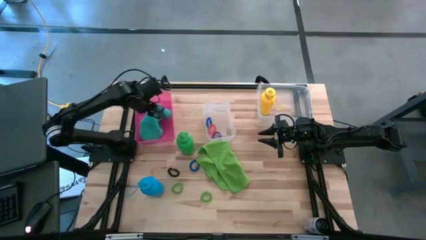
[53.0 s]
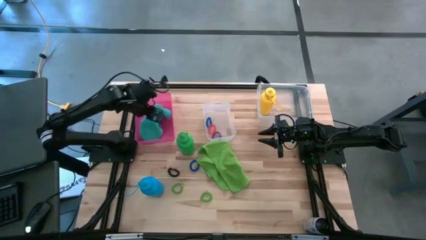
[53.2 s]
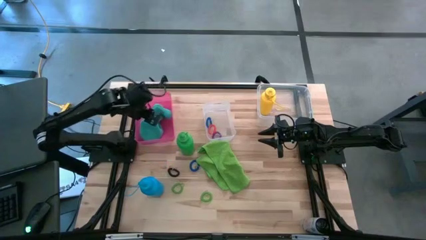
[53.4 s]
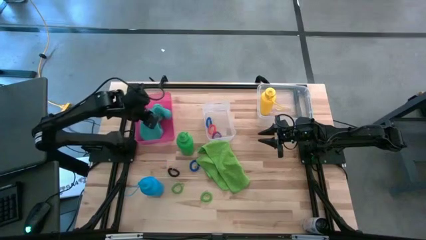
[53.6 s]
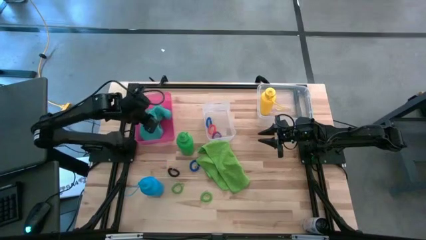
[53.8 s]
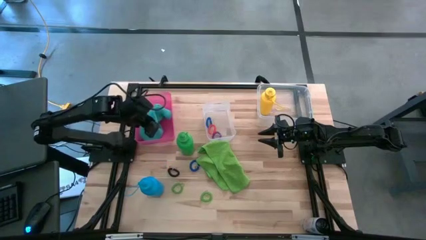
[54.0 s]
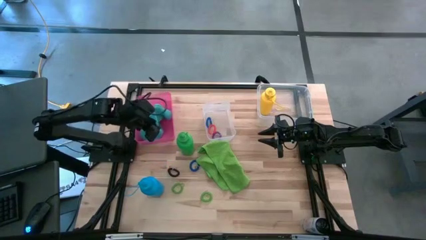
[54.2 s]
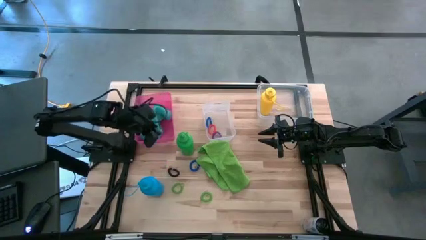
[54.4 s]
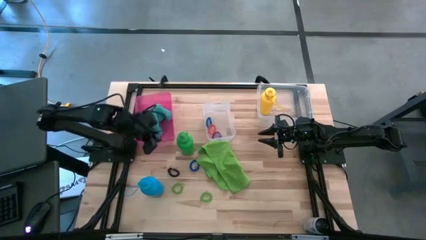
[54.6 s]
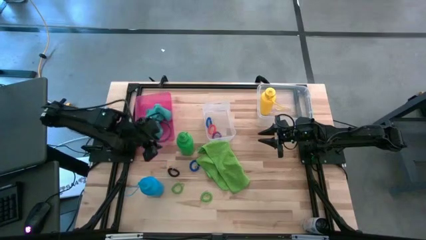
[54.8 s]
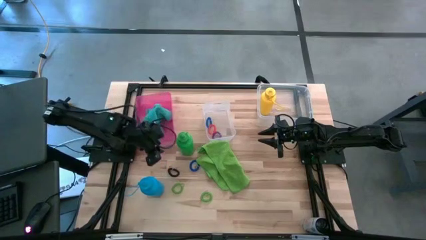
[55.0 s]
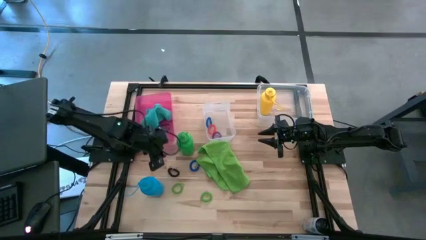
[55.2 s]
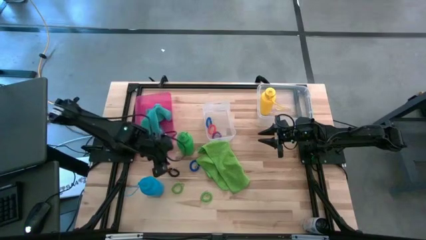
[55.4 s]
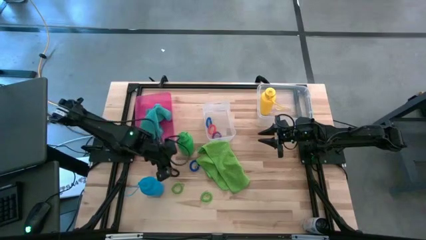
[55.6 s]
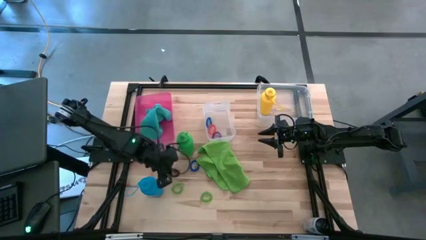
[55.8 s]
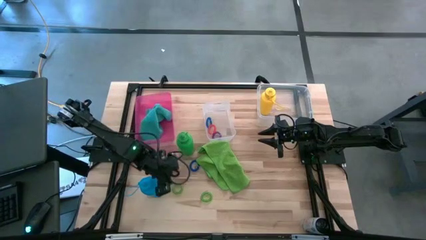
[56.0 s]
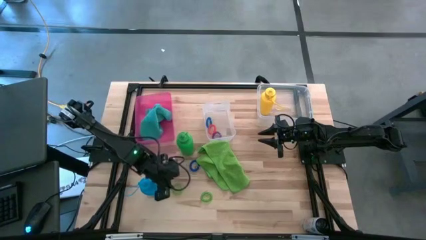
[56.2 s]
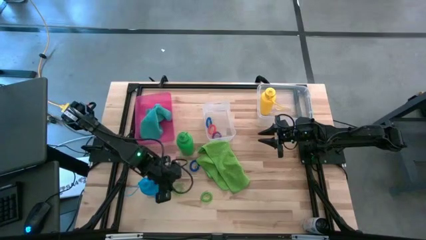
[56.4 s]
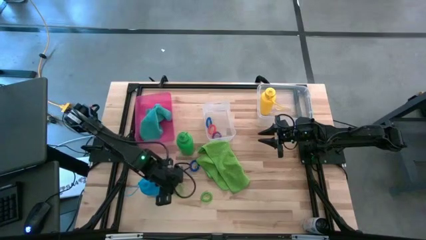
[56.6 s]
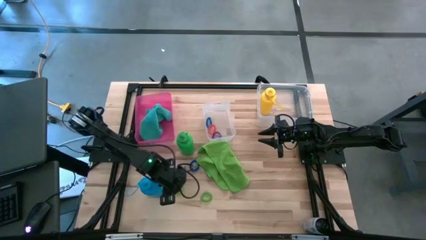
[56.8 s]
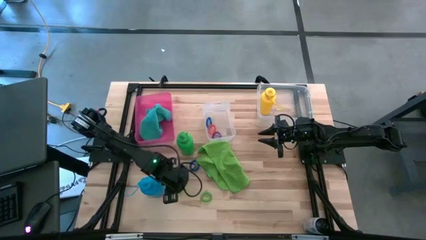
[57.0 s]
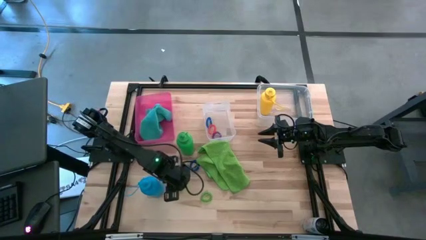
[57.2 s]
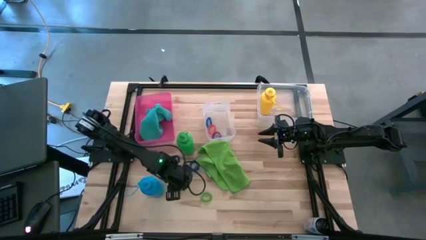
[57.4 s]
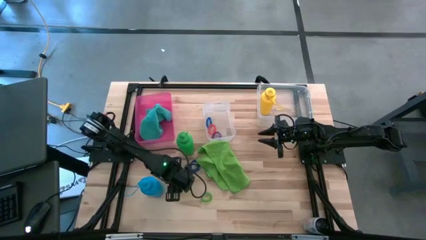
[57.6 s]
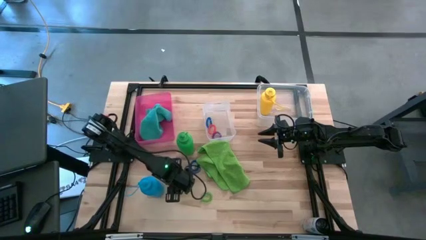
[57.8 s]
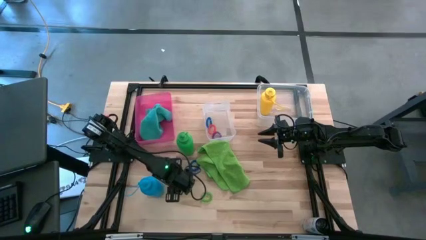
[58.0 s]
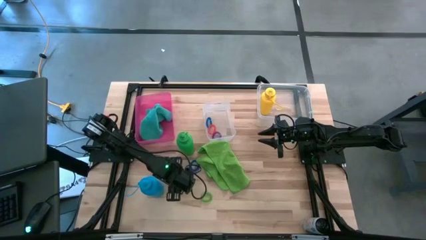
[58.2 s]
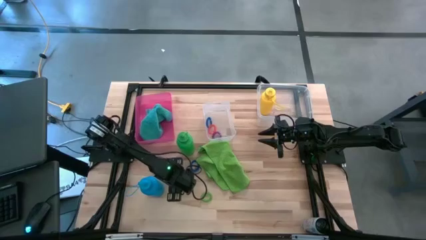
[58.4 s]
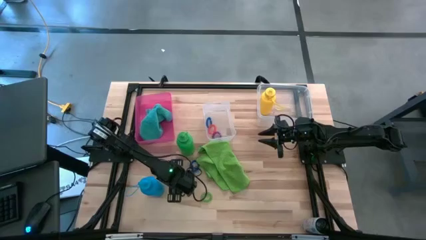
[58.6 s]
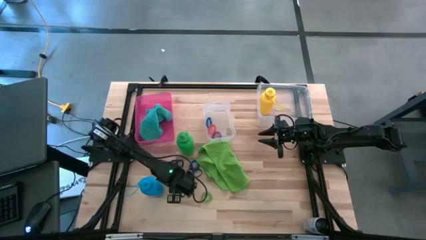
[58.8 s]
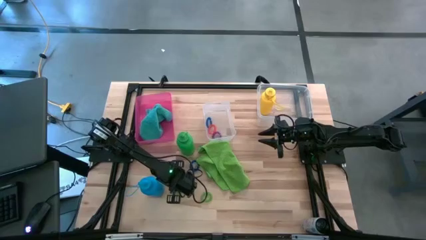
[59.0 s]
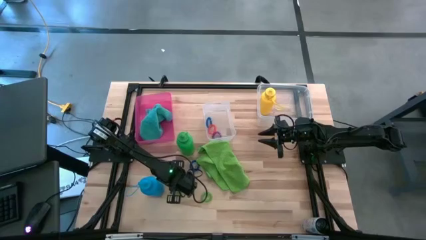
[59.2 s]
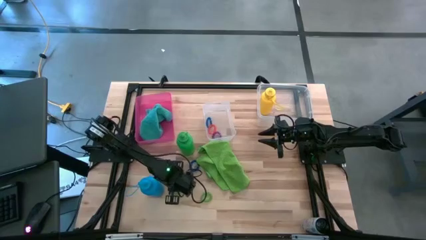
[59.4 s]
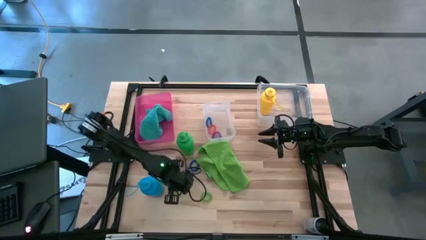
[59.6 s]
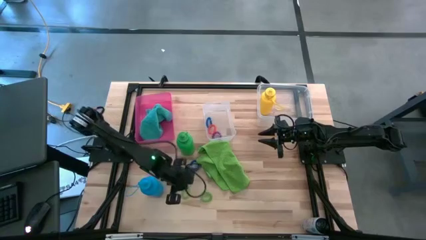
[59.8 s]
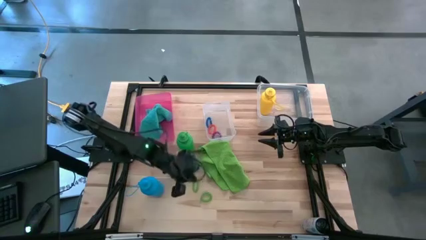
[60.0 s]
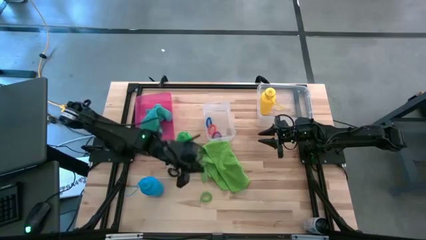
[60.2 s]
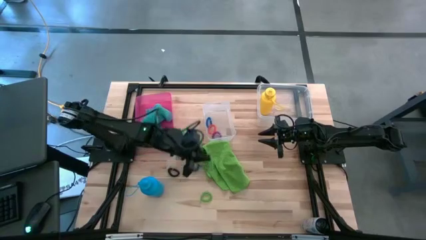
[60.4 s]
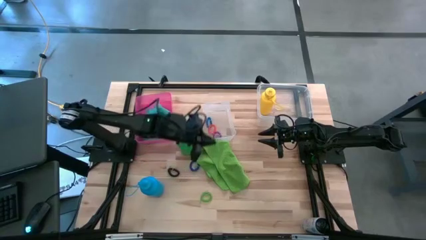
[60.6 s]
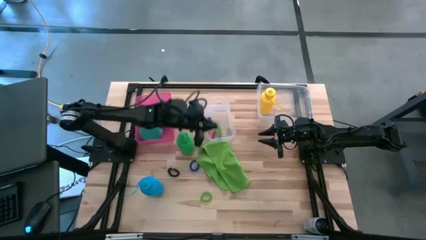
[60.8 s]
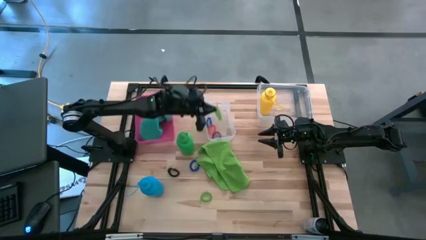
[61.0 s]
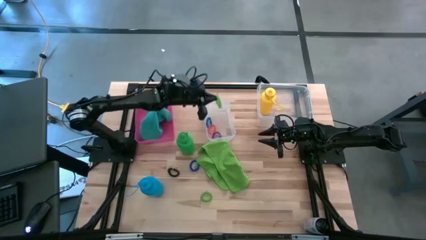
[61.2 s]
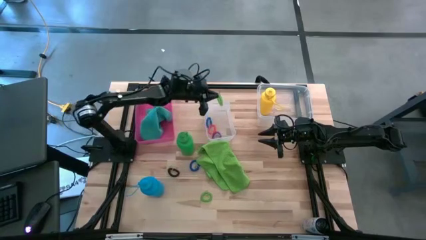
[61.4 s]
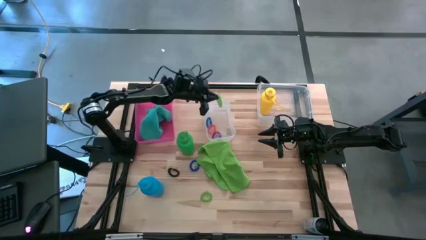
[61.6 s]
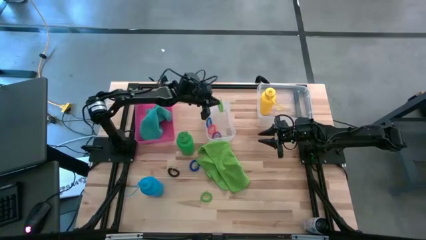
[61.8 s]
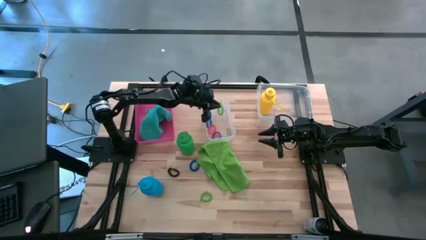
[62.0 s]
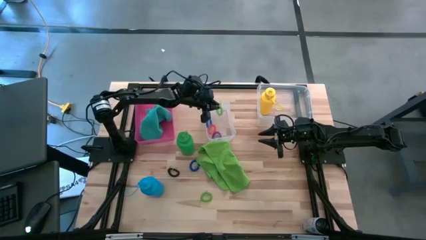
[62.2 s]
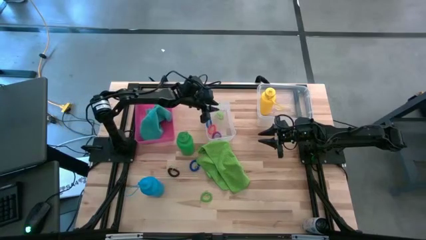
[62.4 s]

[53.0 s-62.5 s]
Task: Pick & Place Sports Items
Put the left green spring keychain into the left transparent bin

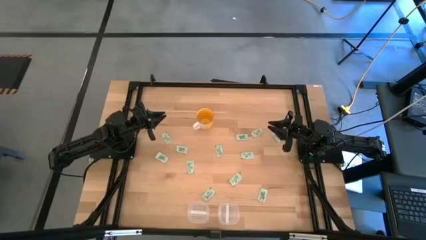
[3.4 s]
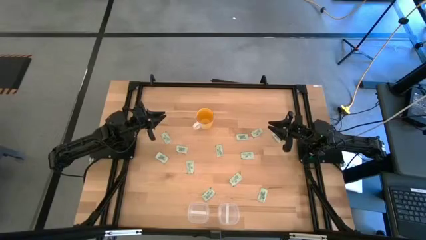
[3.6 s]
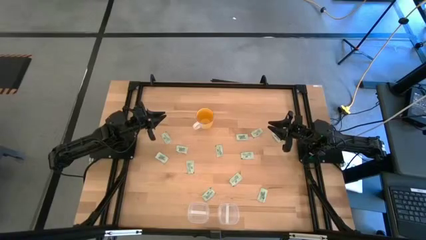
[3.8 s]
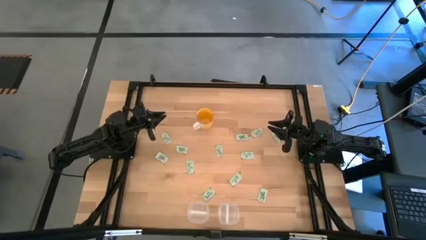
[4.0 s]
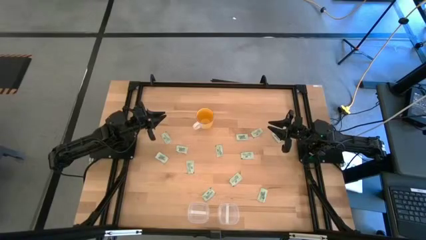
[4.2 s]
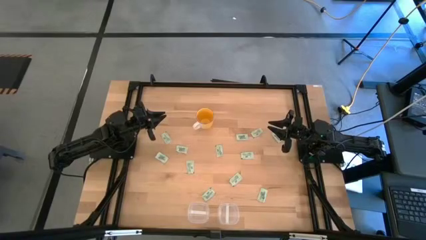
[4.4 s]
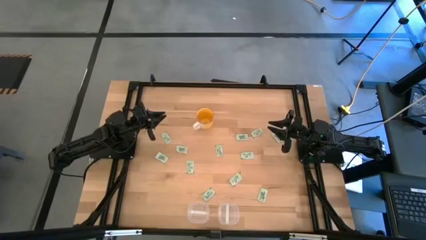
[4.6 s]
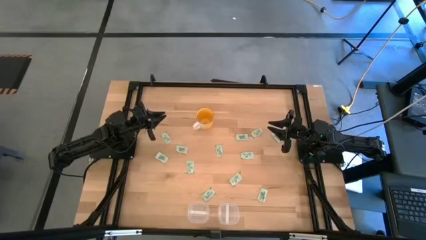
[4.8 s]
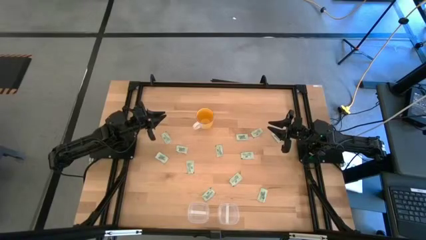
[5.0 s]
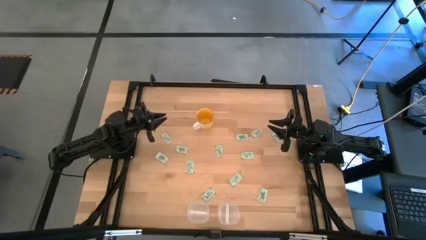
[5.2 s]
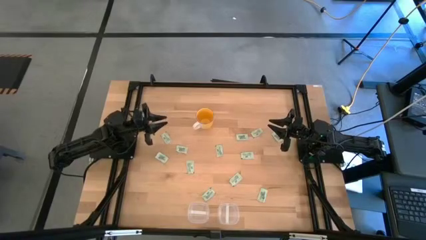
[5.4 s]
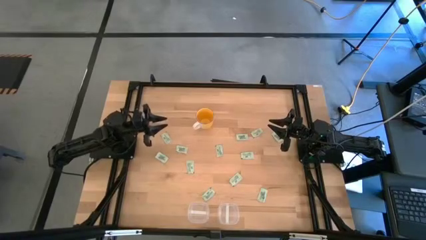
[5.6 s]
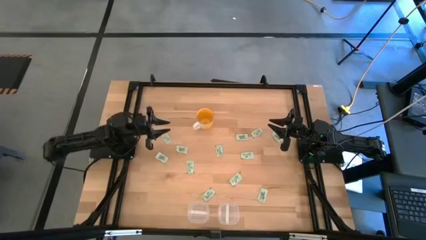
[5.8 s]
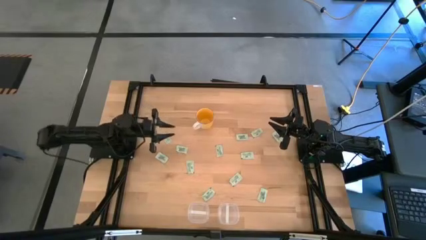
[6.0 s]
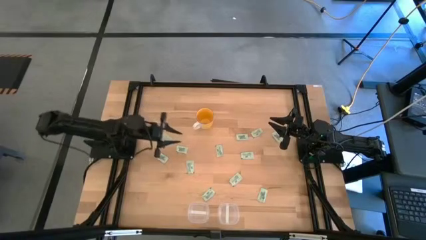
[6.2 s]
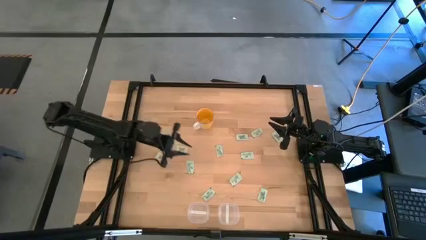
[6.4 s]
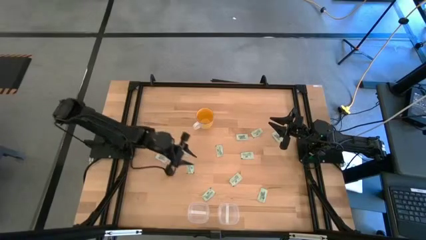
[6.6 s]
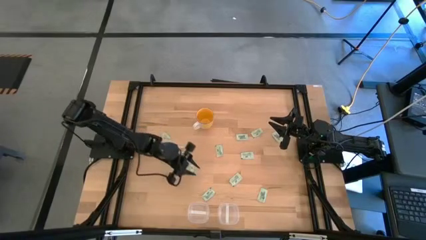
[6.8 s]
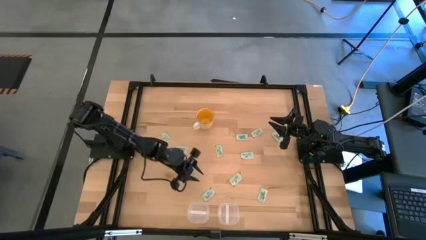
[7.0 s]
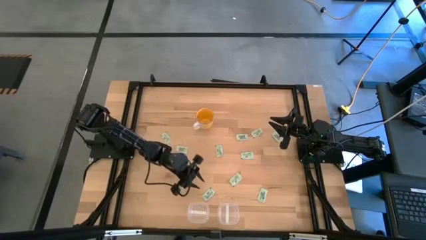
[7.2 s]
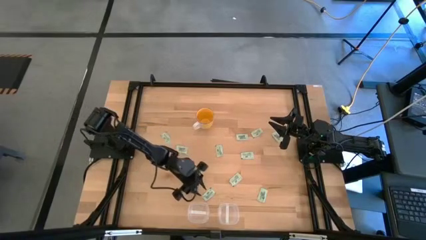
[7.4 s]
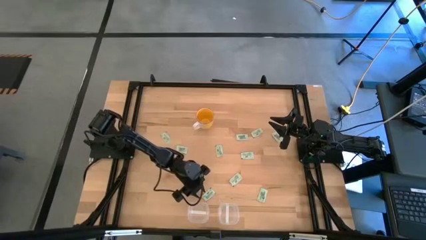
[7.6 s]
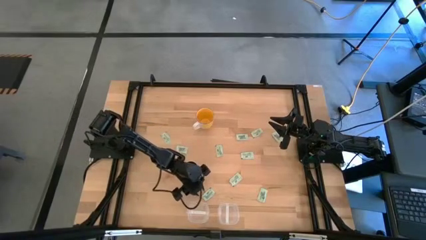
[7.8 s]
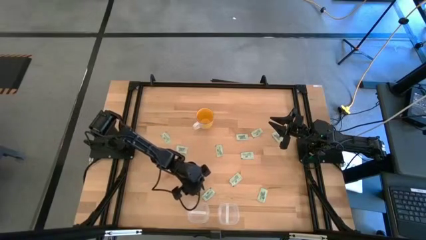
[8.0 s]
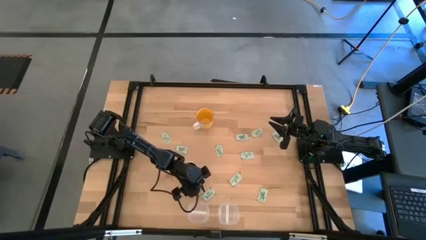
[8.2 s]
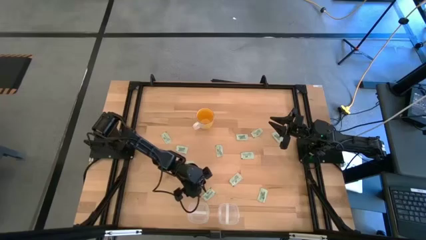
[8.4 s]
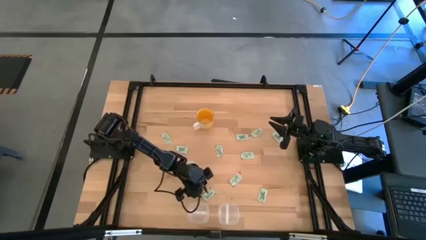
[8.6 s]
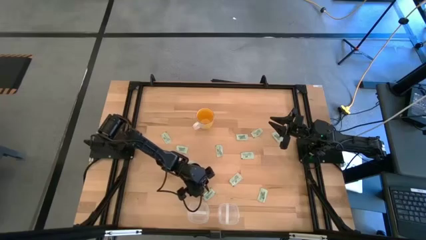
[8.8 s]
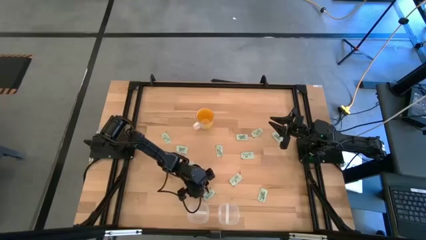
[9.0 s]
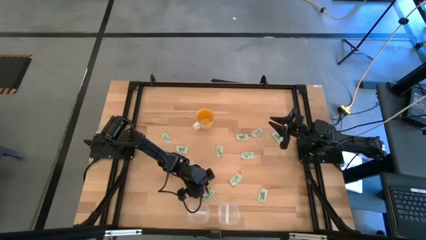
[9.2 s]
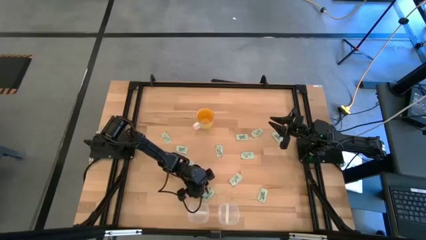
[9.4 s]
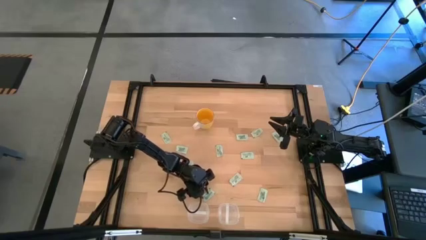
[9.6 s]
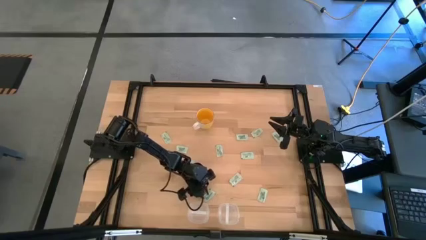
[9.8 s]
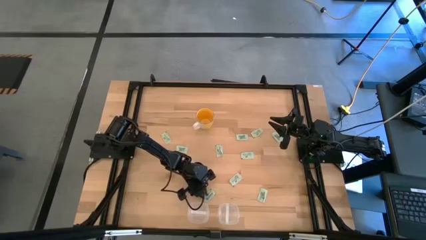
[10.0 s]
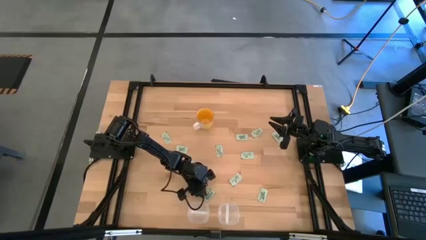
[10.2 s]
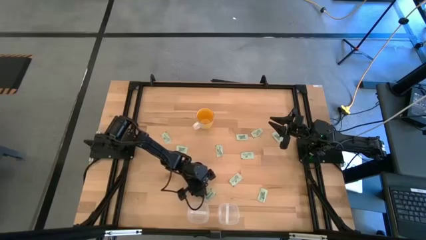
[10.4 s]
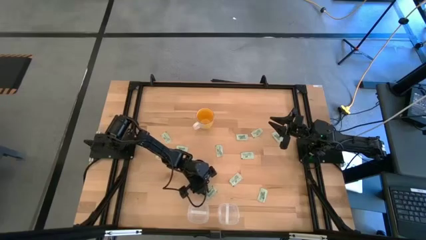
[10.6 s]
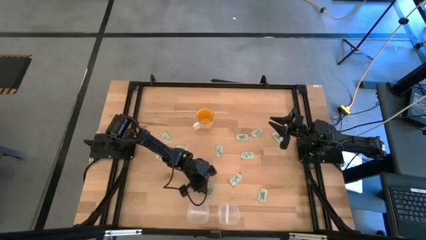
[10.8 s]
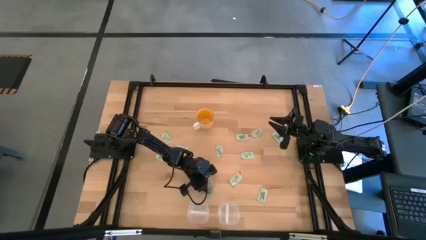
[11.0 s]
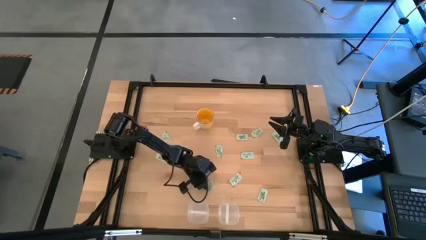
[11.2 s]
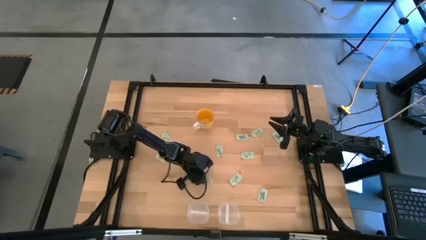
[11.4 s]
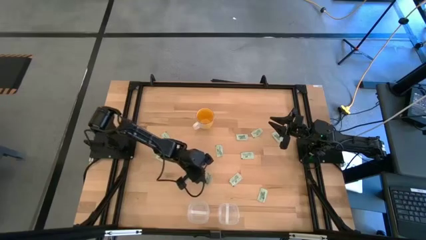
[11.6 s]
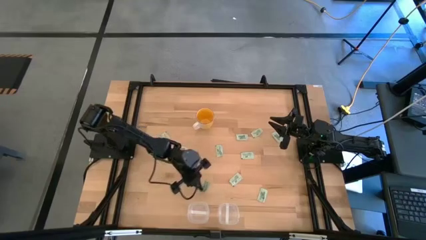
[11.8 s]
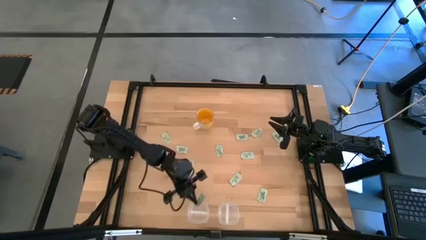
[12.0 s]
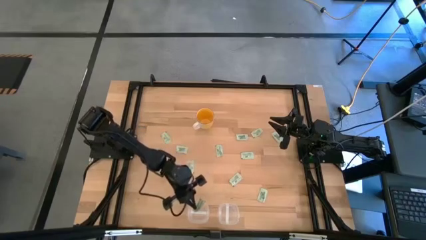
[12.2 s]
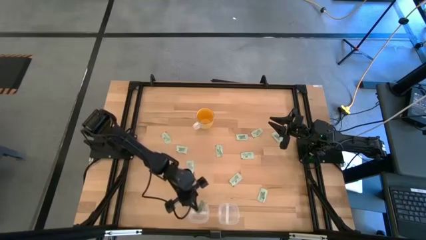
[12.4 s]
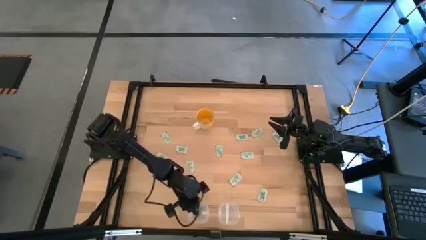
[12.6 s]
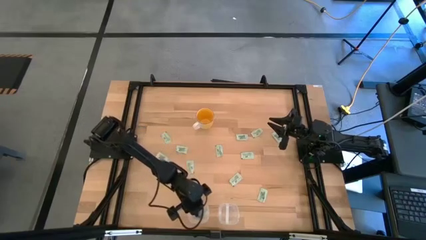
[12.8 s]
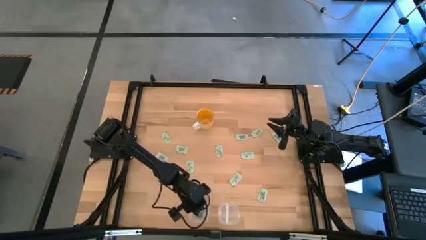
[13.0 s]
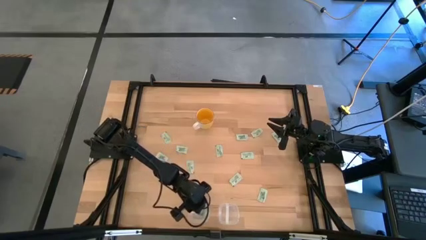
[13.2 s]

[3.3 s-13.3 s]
Task: Pick and place items into bin
Put the green stevia packet into the left transparent bin
